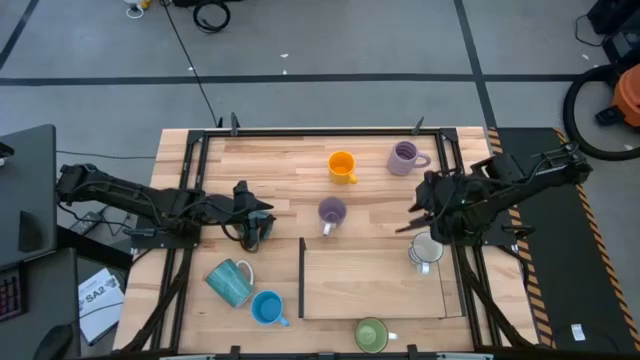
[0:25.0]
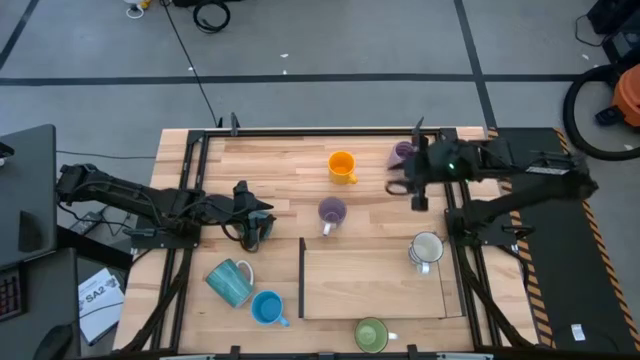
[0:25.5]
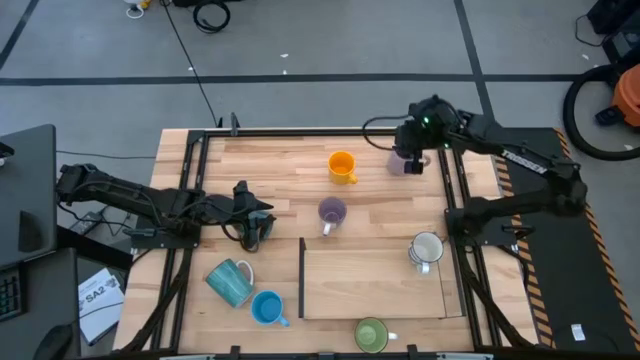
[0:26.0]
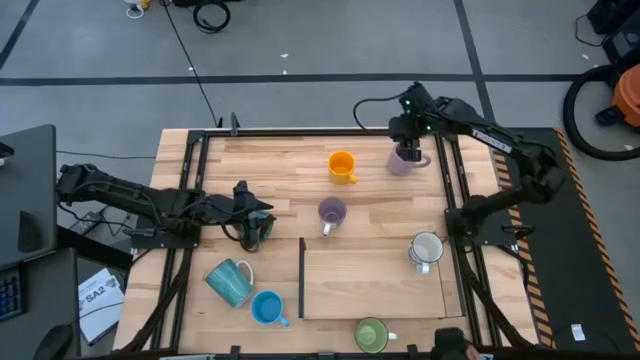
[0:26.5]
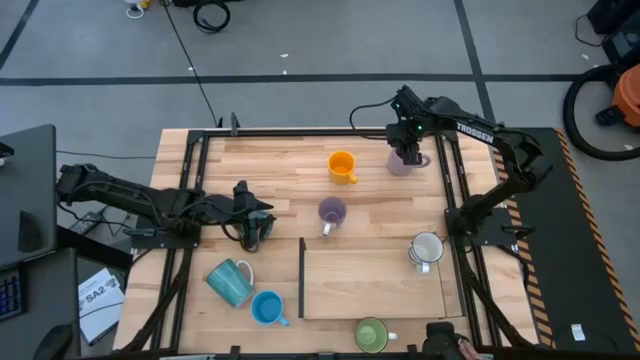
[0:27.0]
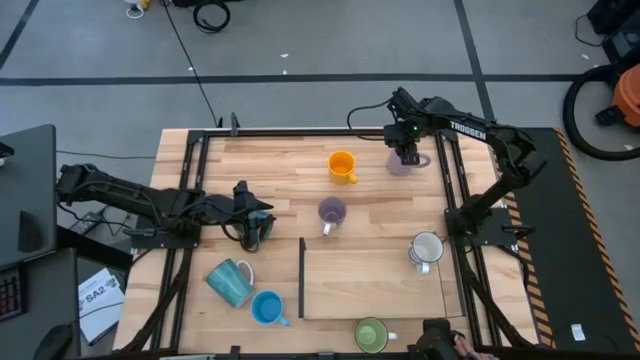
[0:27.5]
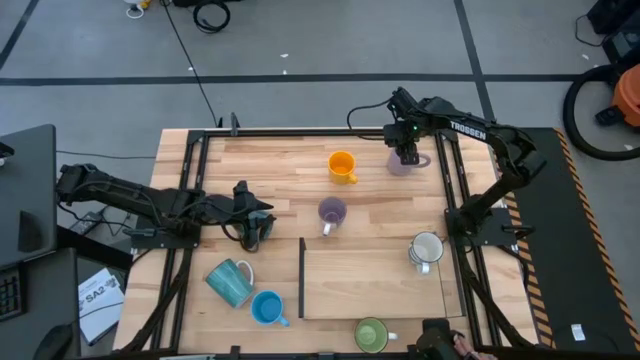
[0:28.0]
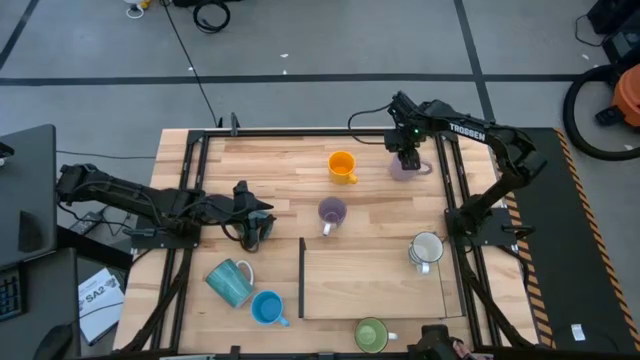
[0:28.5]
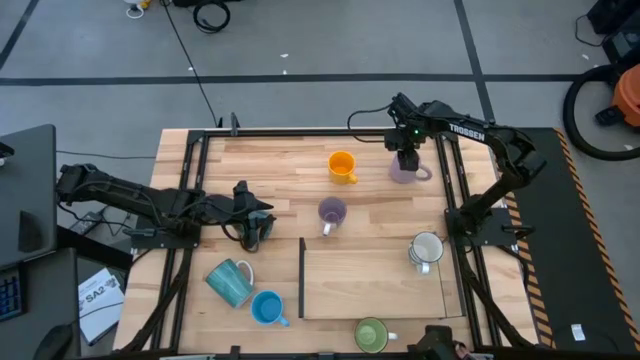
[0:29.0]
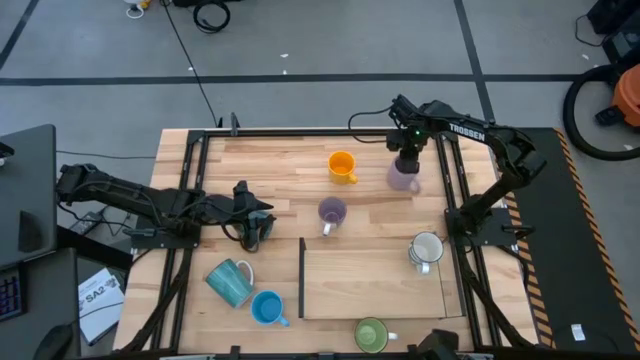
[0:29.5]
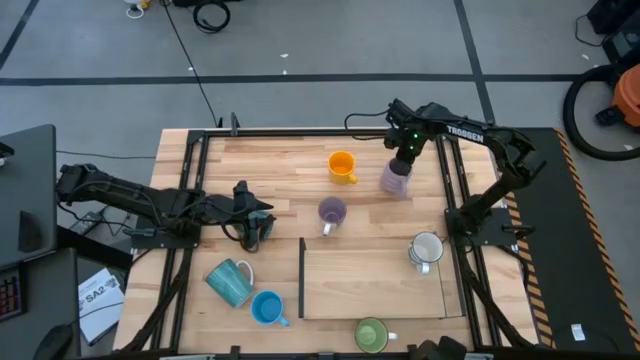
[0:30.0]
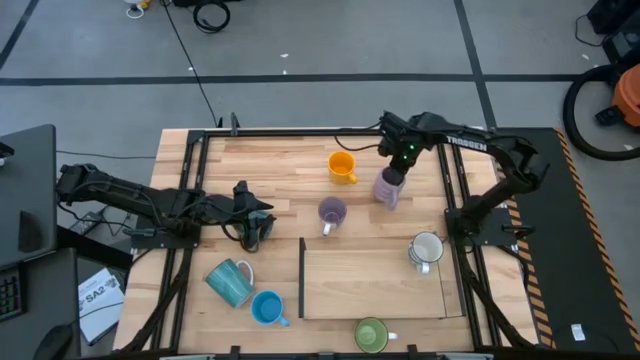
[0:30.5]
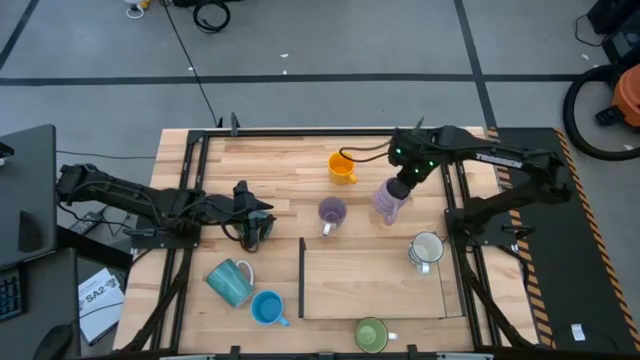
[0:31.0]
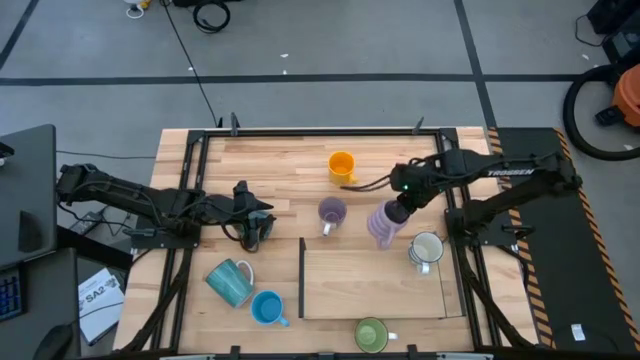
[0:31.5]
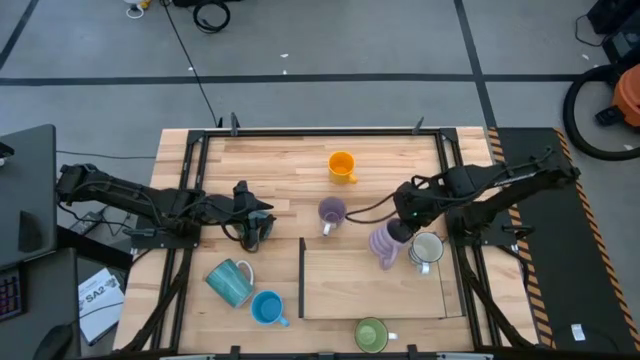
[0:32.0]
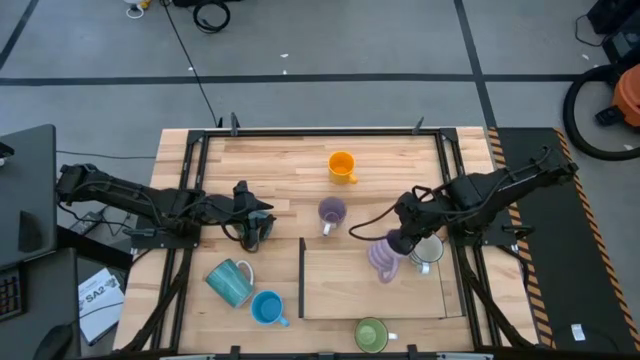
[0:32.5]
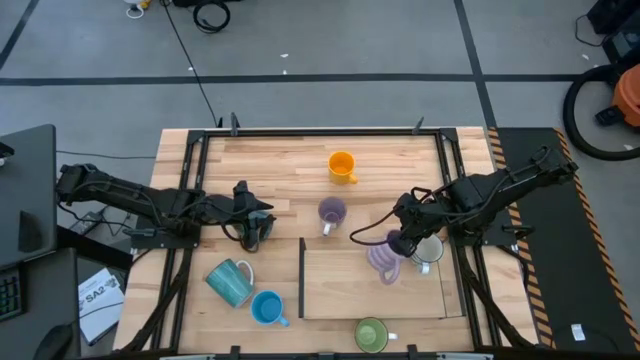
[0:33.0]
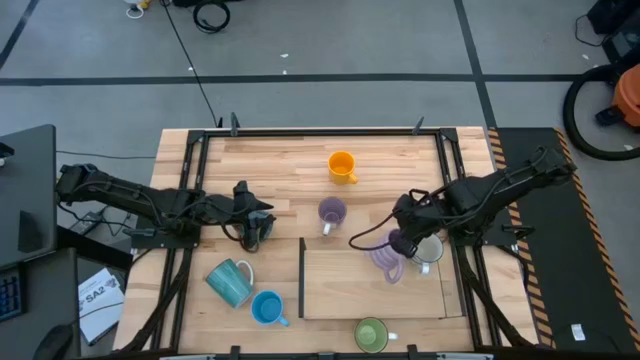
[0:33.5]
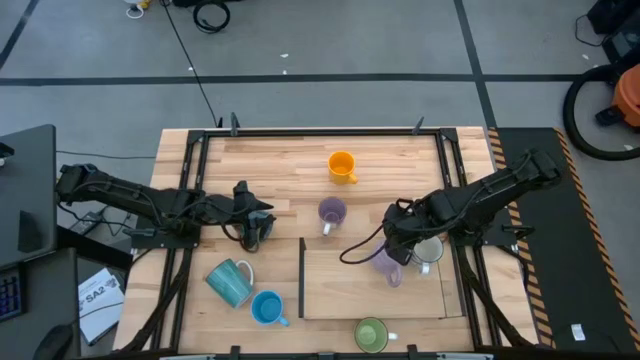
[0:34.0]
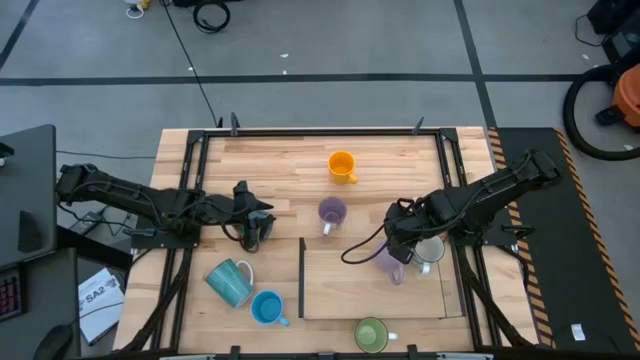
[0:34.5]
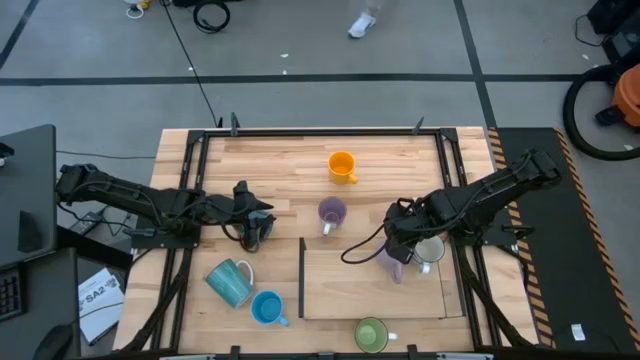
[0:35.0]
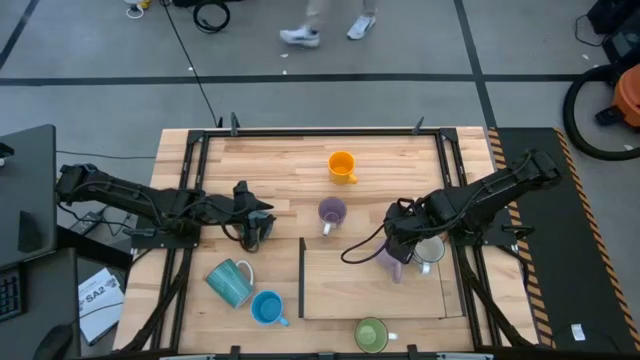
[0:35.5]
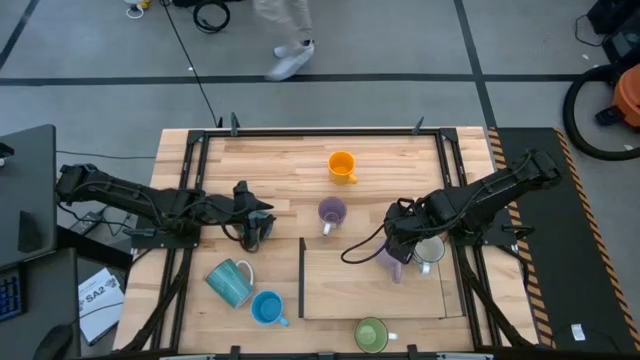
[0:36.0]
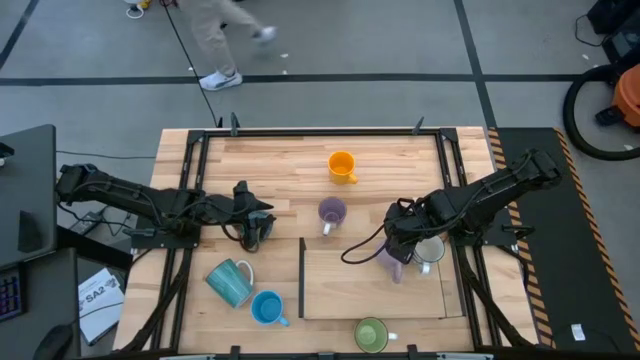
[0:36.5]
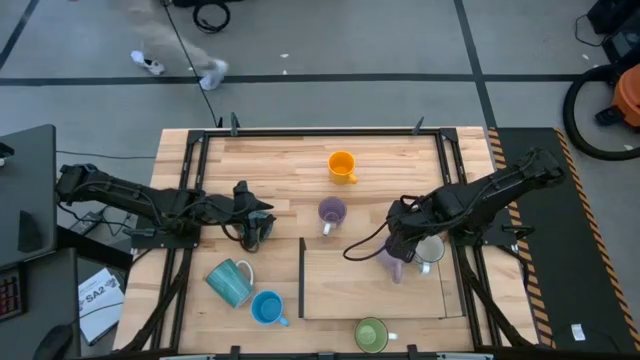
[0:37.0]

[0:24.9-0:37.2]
Task: Place coffee mugs
Put the top right purple mug on the shelf

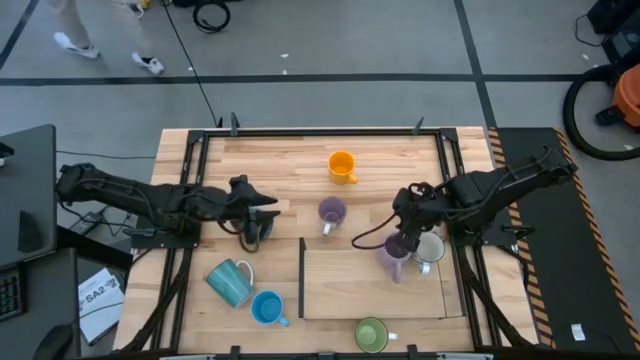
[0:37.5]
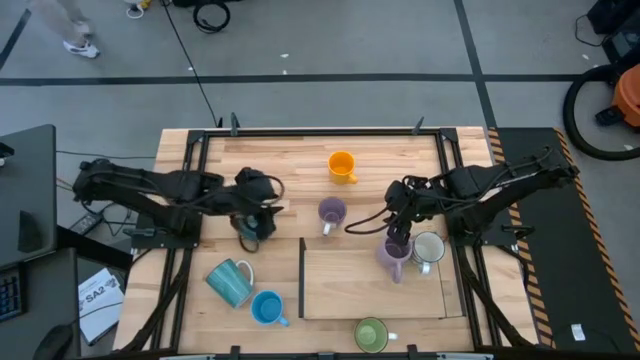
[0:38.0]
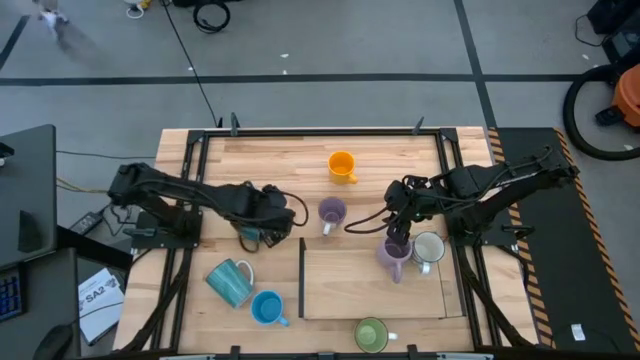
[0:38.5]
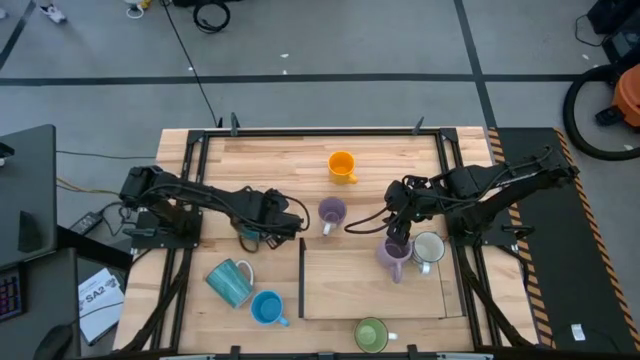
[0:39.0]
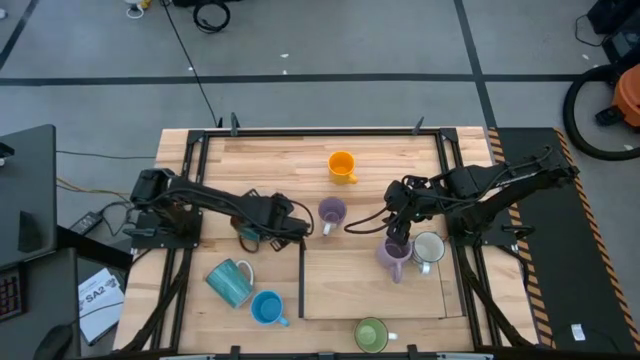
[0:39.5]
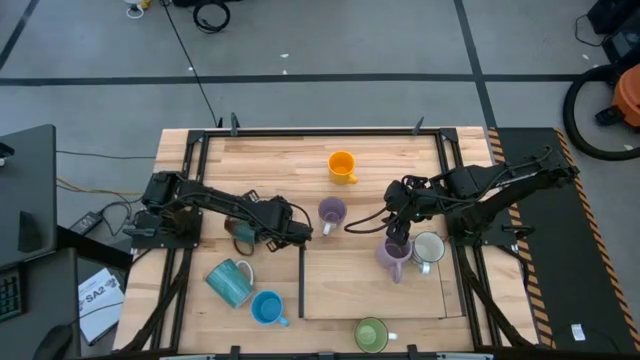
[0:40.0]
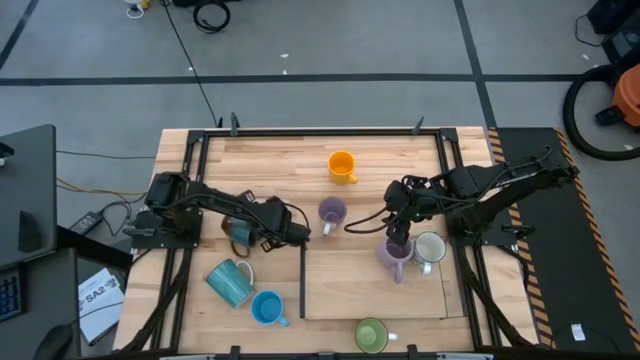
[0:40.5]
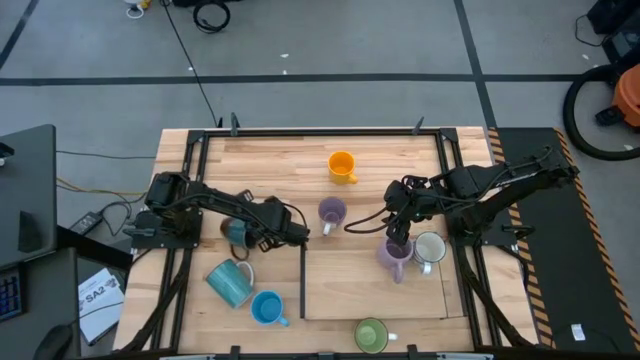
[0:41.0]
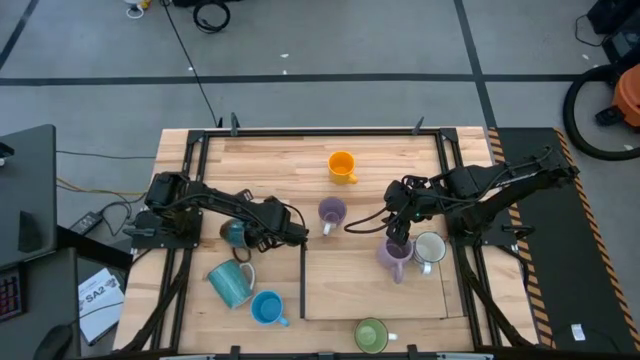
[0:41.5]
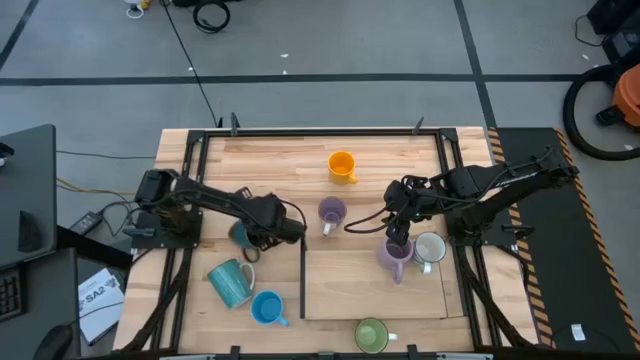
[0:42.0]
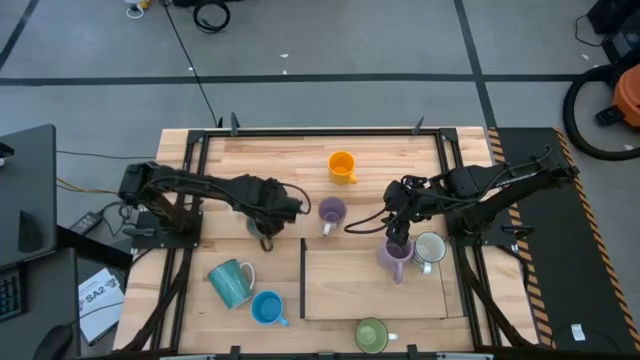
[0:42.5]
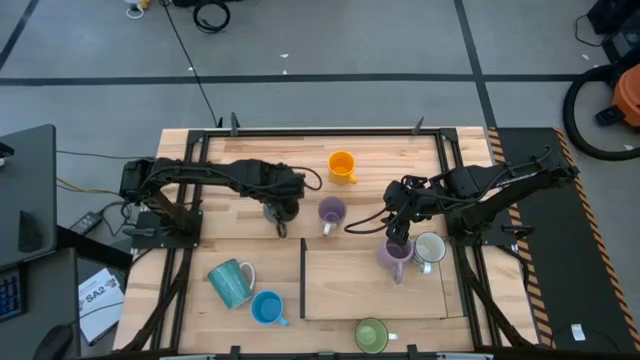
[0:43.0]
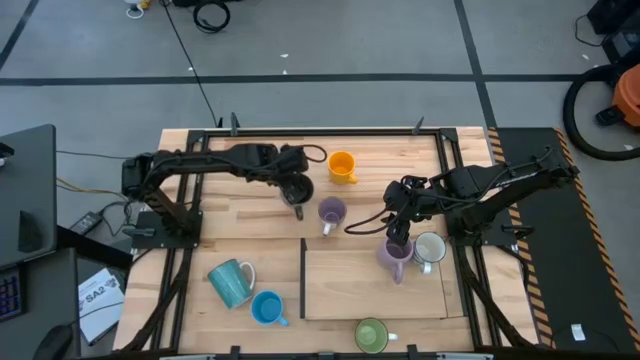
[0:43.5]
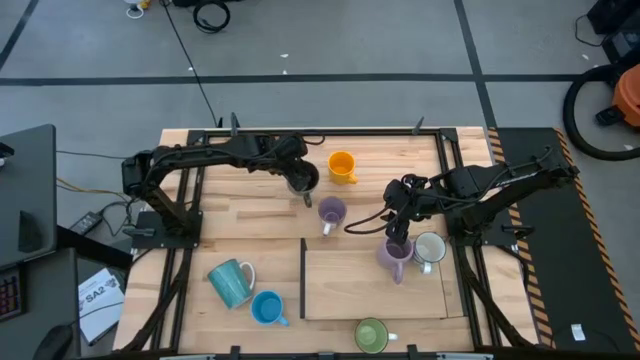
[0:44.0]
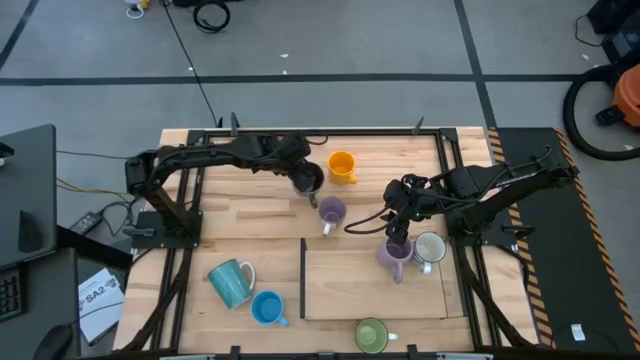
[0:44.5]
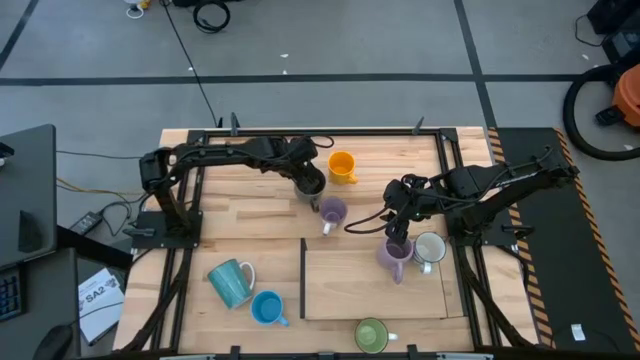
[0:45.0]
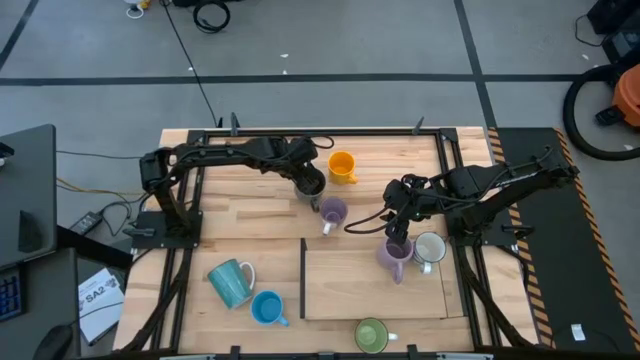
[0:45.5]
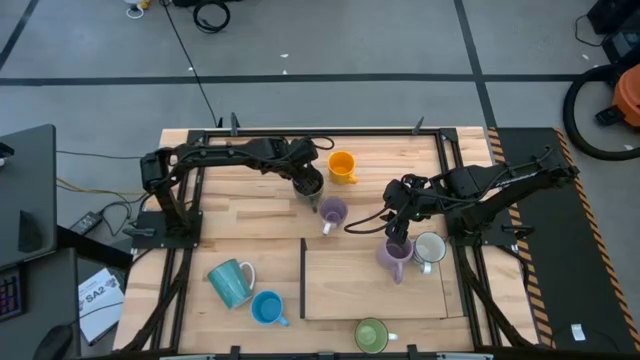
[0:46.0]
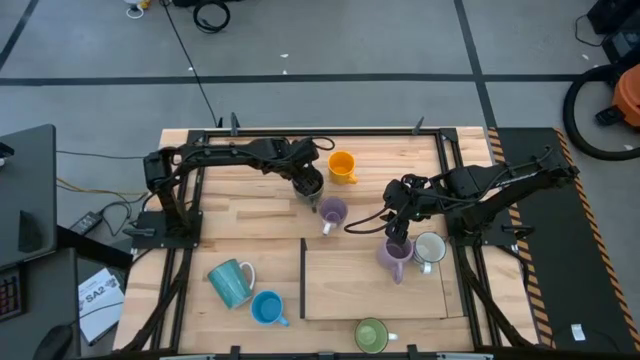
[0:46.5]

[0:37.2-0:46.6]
Move the blue mug to the top middle of the table
